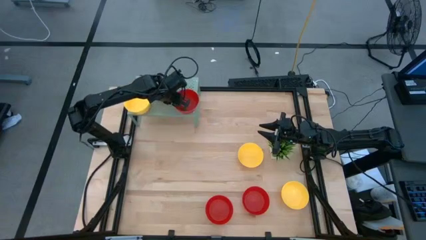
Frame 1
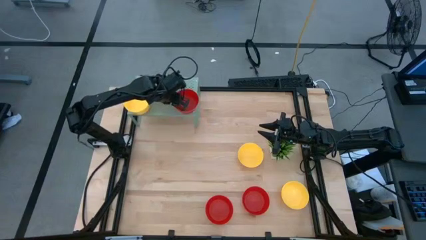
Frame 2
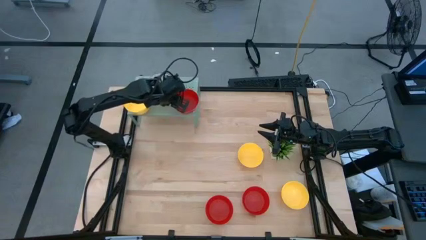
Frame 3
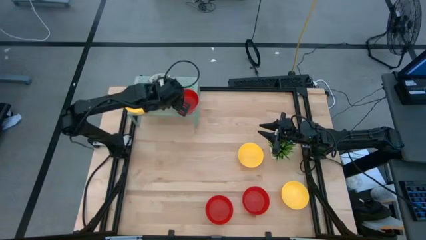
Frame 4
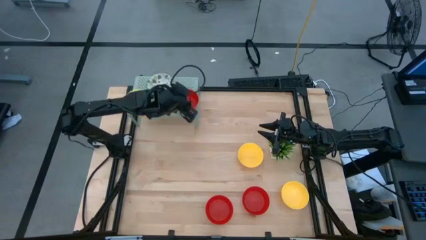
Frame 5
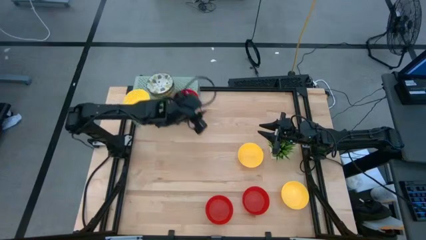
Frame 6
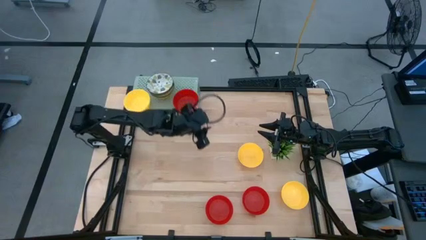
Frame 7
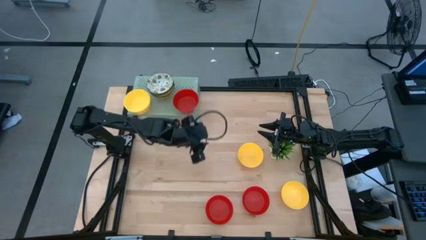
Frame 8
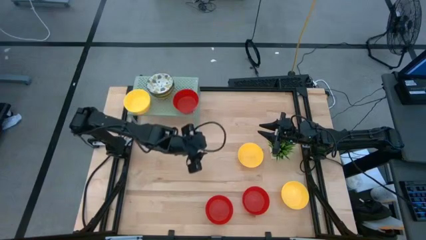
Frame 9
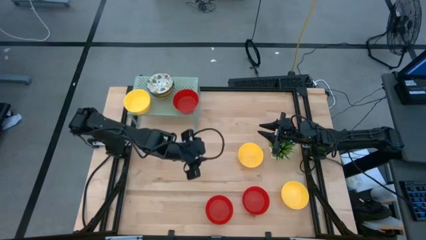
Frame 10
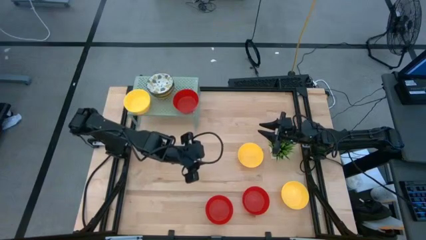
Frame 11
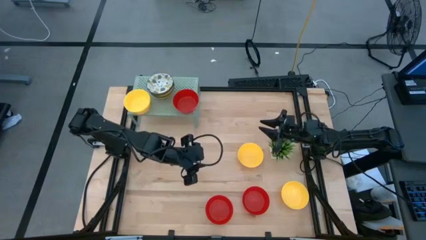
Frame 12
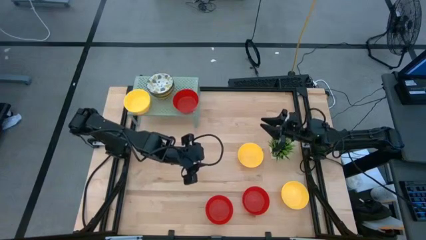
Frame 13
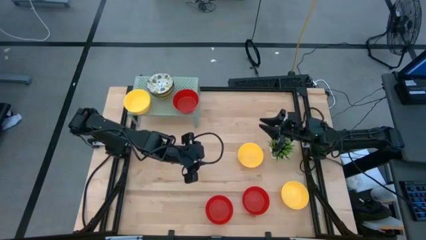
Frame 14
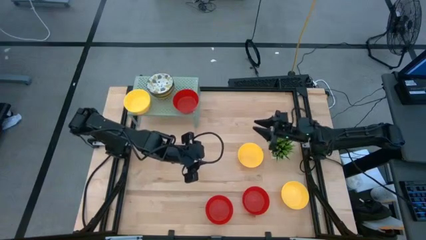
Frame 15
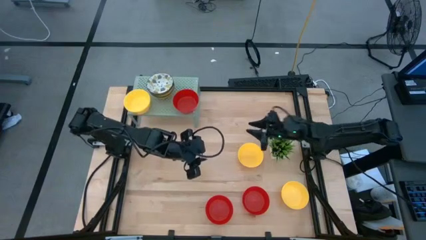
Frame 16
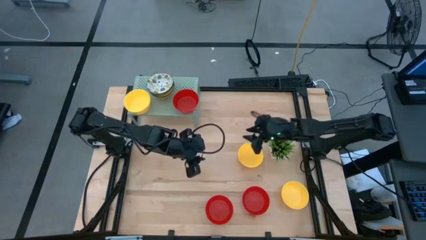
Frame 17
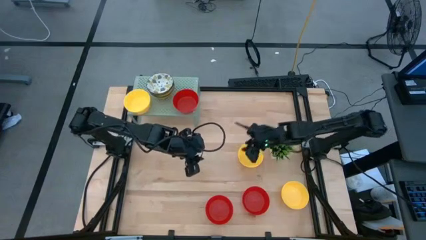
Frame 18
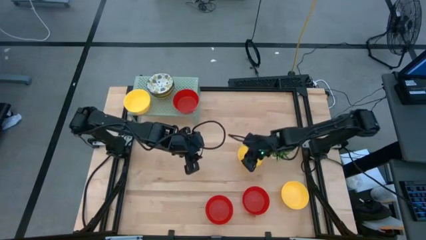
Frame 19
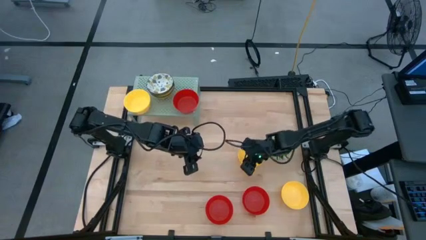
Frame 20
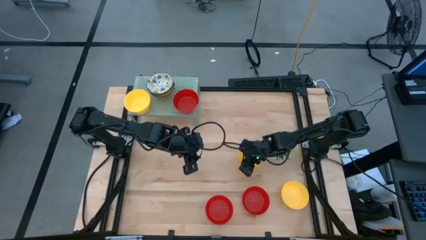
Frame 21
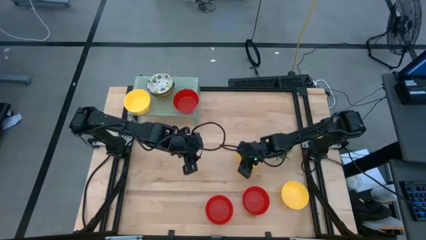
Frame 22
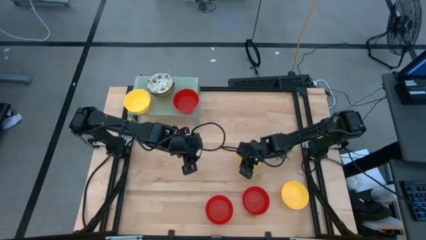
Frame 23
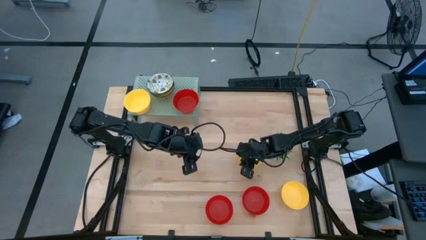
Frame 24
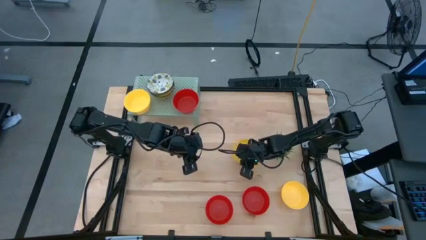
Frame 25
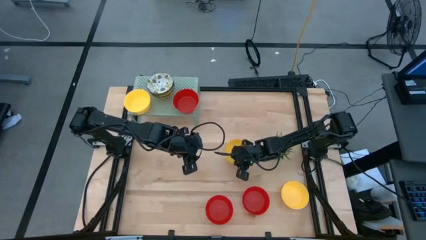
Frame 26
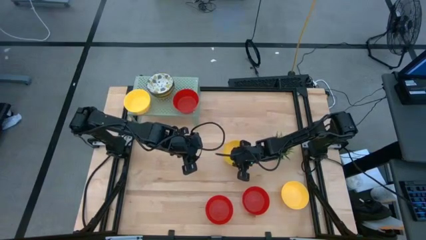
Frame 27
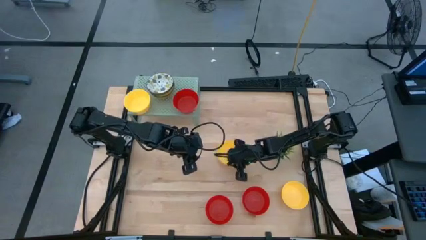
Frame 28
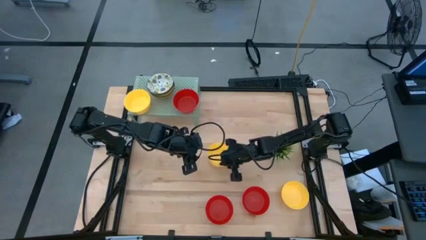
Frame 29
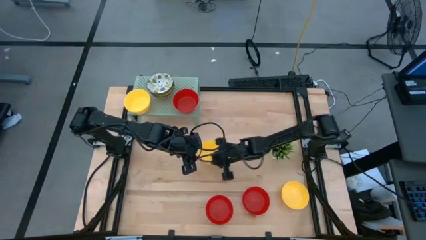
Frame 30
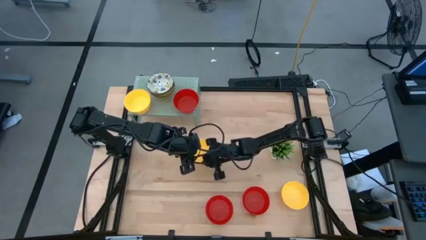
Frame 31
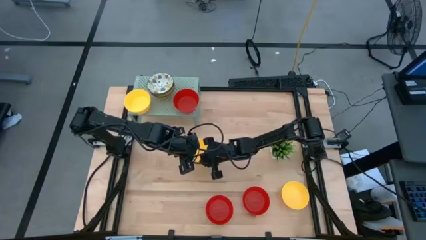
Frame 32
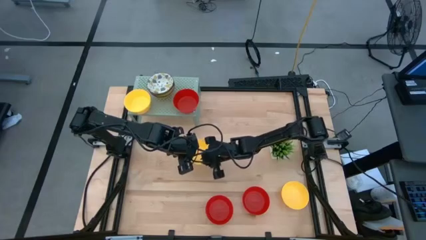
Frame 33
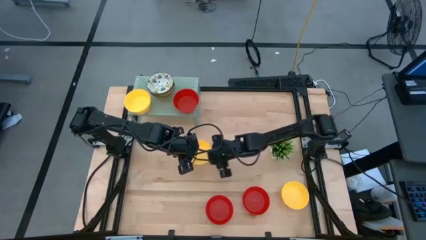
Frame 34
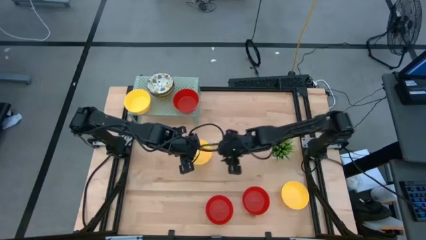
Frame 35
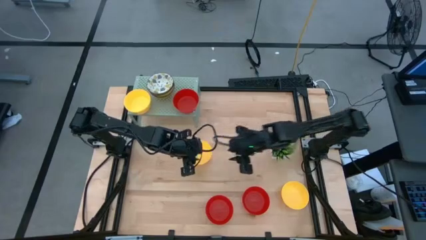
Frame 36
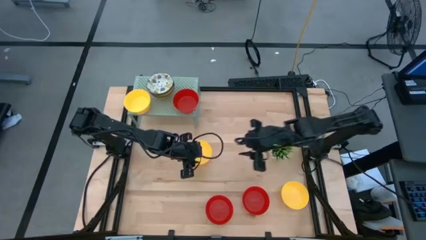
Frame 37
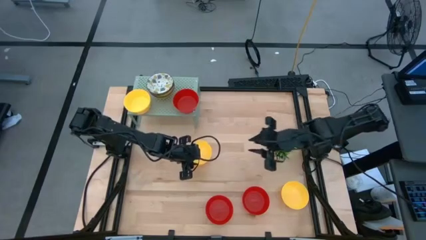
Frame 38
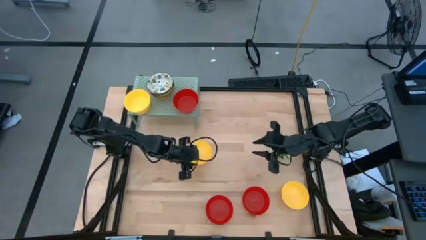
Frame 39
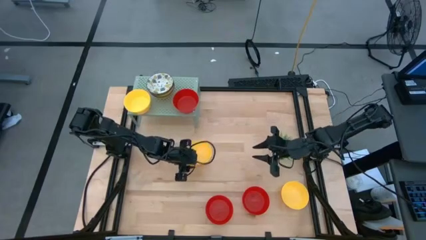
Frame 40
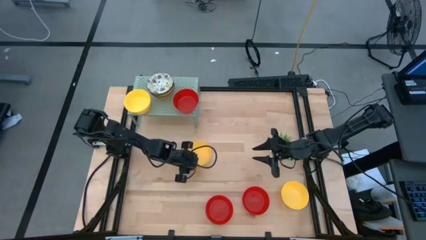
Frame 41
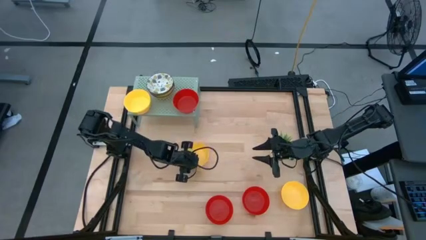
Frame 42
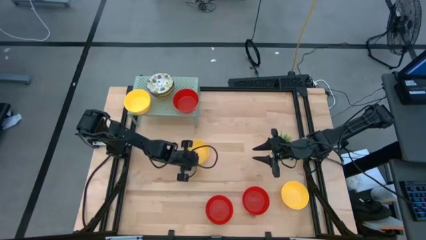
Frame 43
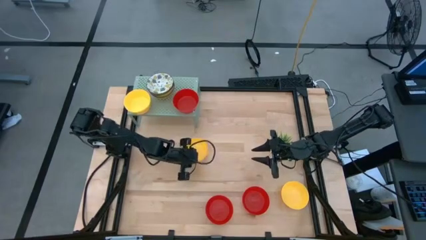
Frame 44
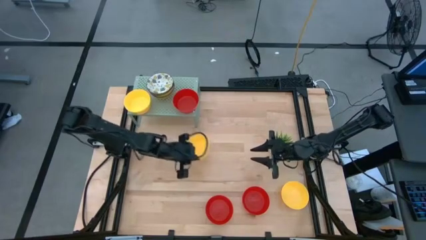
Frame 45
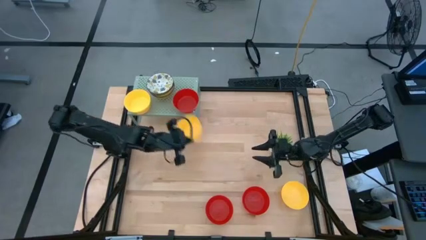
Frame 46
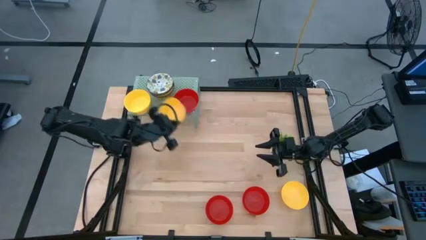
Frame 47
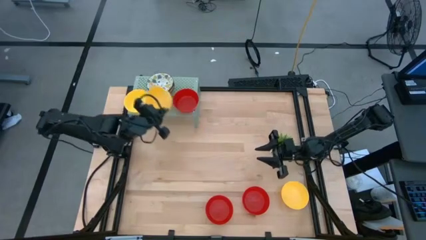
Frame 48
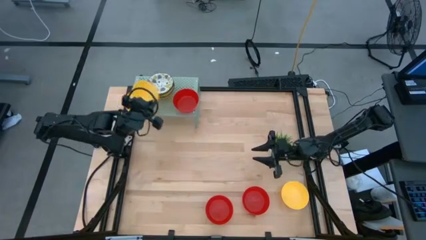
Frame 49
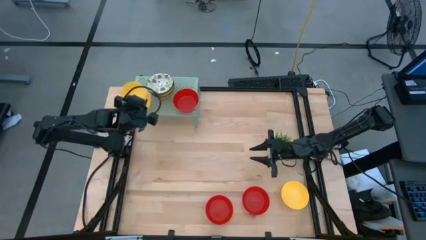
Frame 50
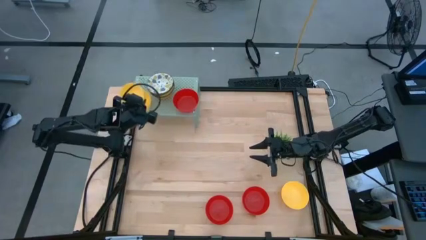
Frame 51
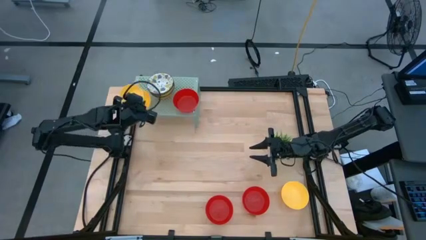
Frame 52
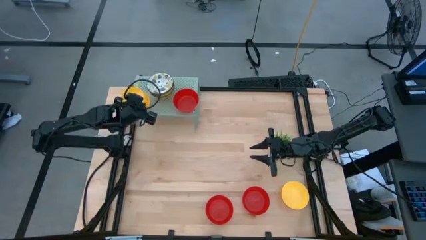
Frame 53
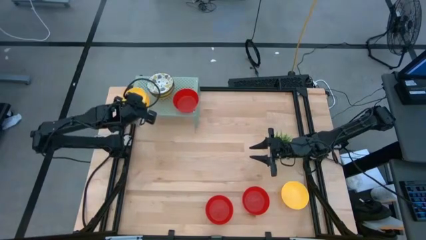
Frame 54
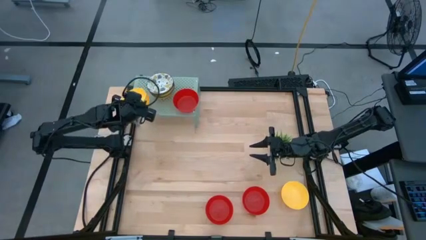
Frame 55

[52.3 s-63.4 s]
Task: Pick & Place Mini bowls
Stack the yellow bowl on the yellow bowl on the shelf

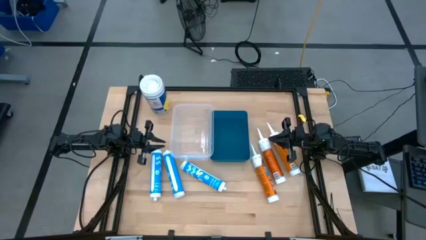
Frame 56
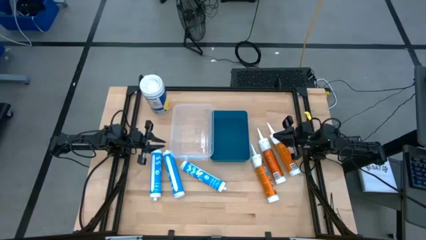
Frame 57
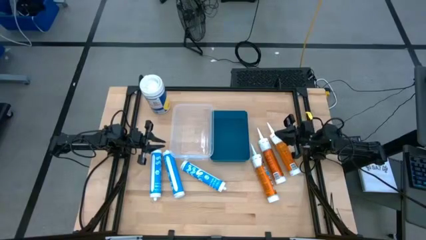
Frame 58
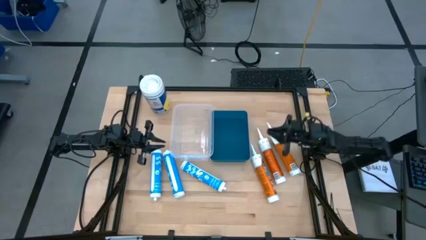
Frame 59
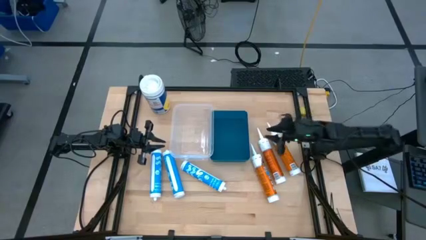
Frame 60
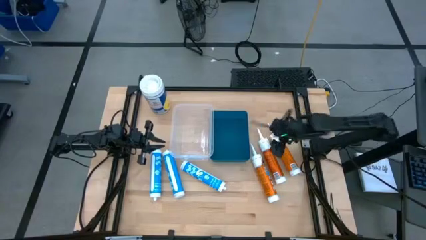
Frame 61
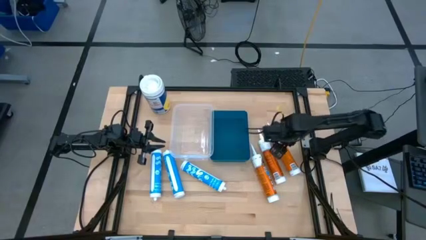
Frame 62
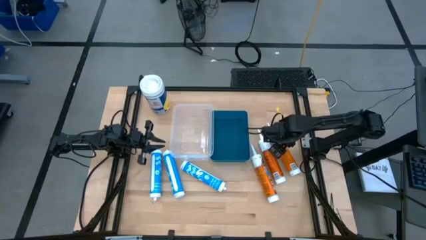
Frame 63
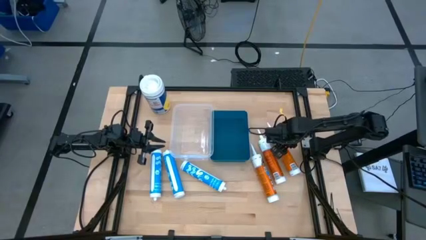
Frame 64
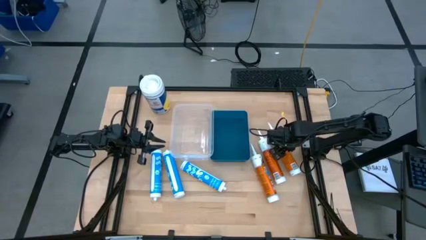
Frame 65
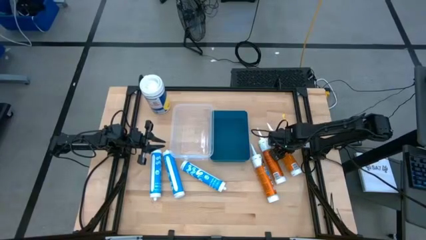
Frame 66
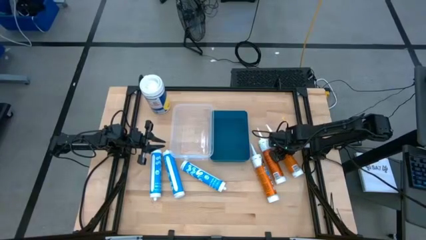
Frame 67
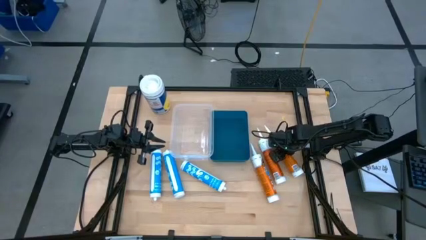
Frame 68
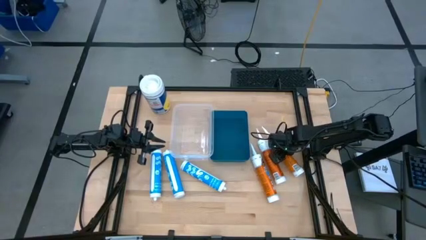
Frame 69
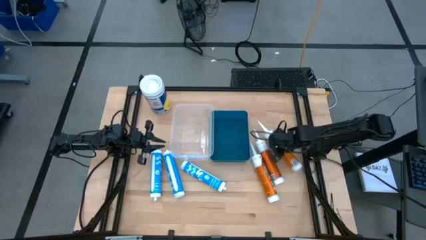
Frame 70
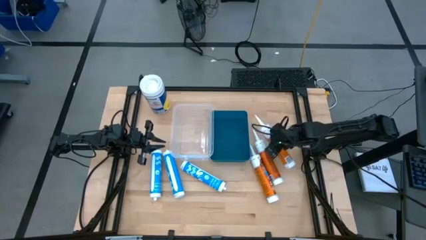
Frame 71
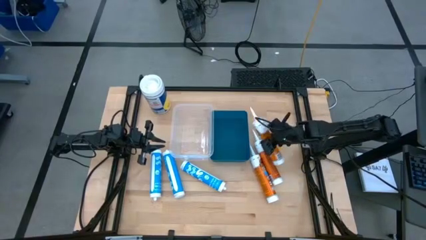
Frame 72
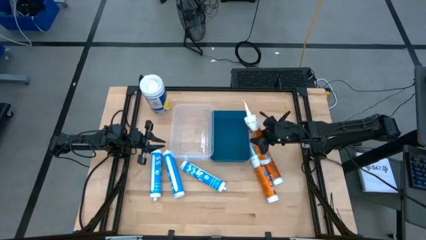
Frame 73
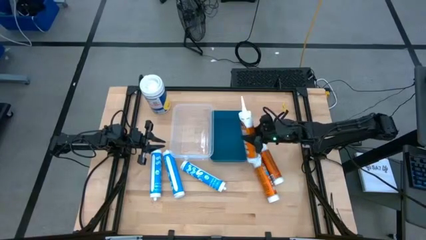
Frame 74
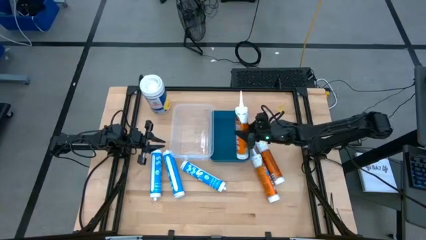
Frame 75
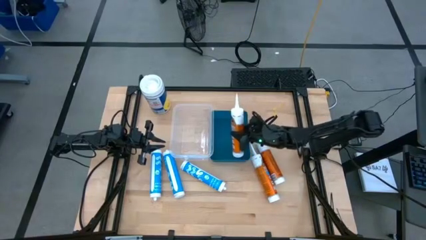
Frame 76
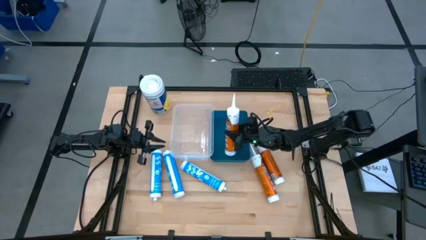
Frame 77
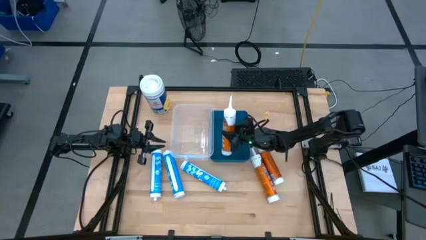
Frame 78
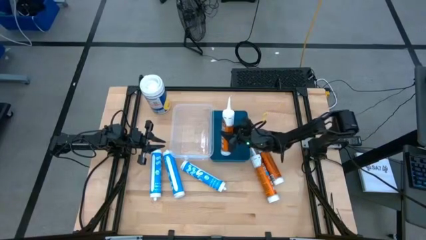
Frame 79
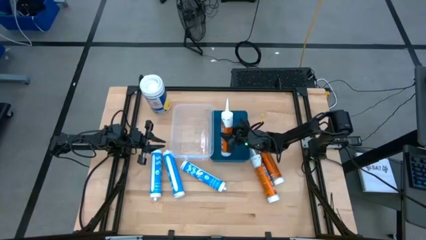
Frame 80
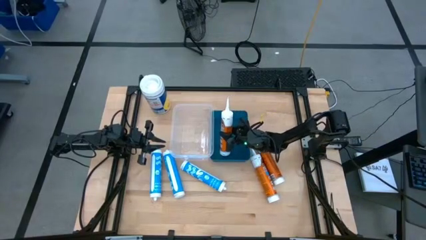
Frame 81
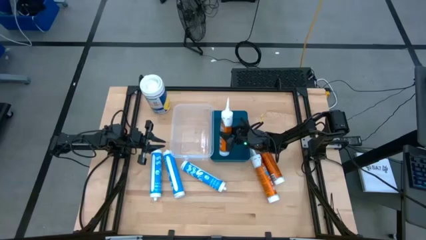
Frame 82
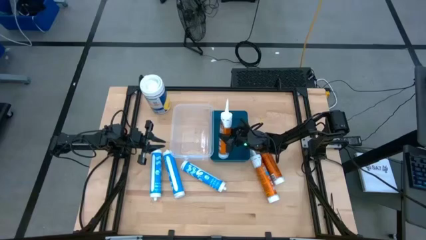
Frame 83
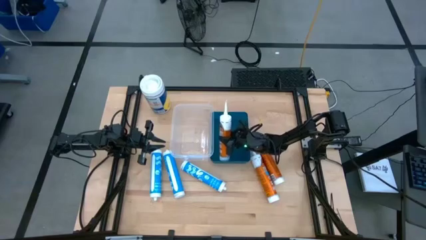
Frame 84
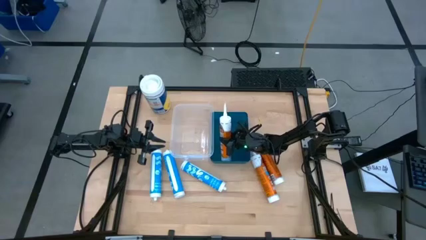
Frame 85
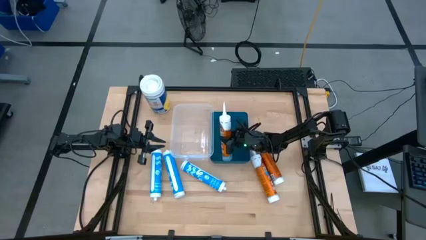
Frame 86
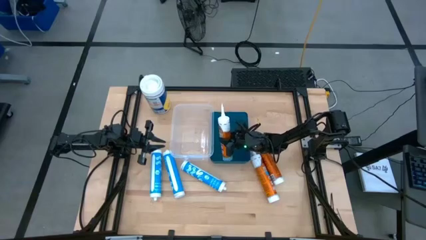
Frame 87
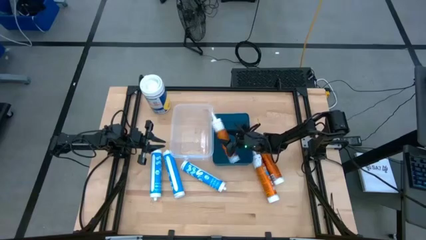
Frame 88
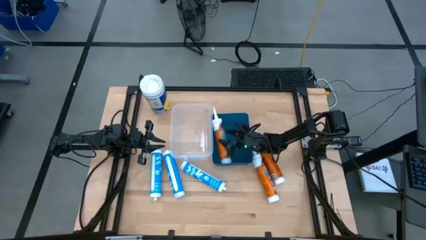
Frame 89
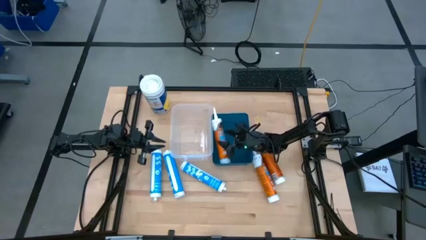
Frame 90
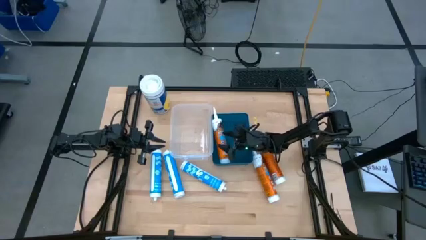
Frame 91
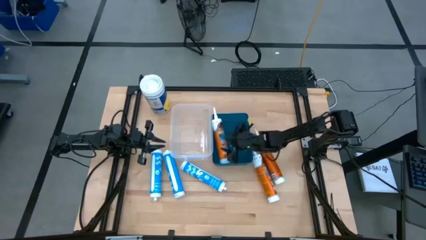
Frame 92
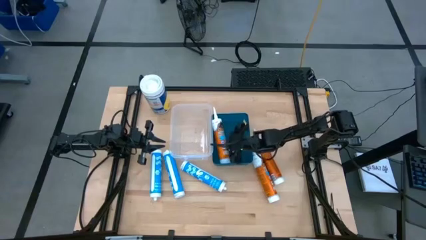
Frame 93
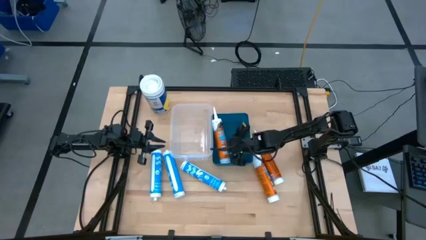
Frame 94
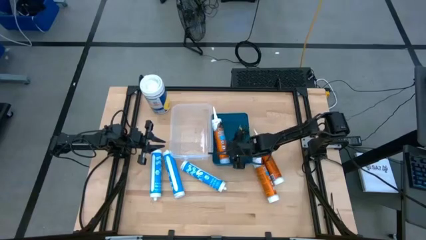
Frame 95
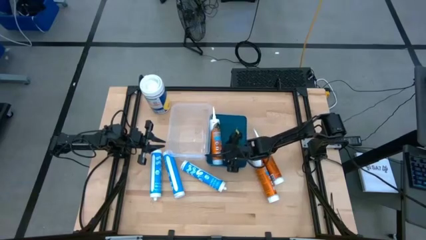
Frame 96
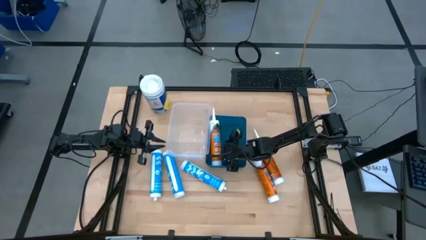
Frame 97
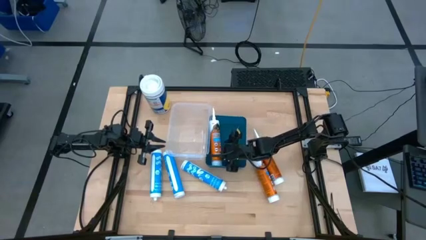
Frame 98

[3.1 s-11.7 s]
Task: Pick & place silicon tubes, Sealant and Lysol wipes
Put the right orange sealant into the blue bin
